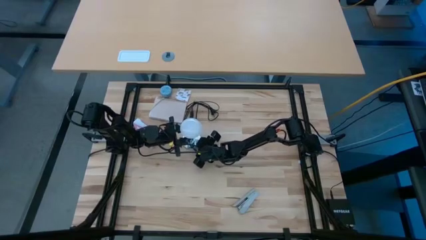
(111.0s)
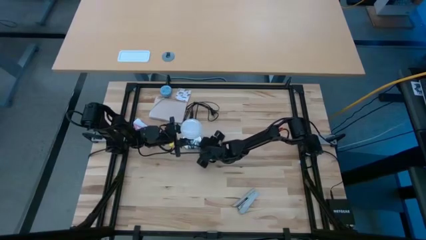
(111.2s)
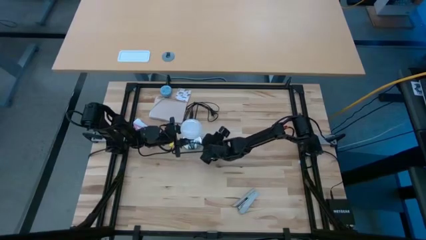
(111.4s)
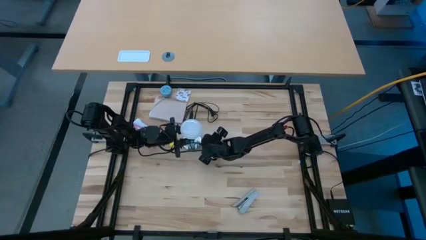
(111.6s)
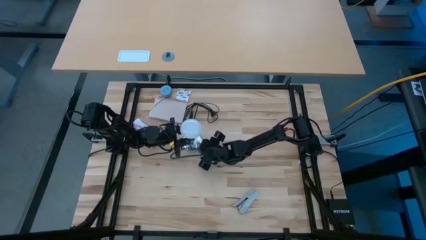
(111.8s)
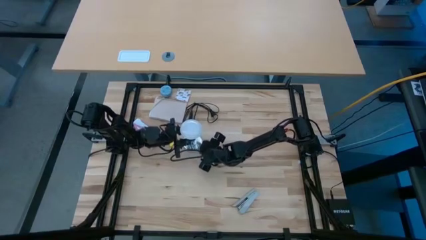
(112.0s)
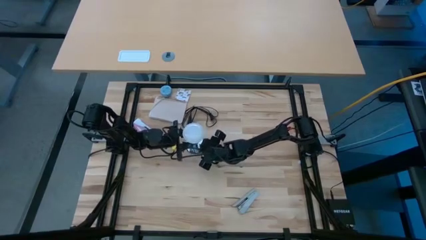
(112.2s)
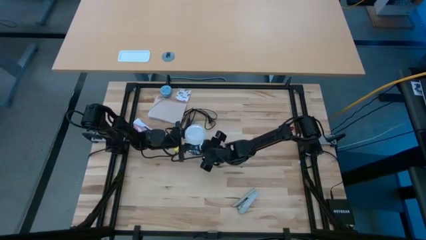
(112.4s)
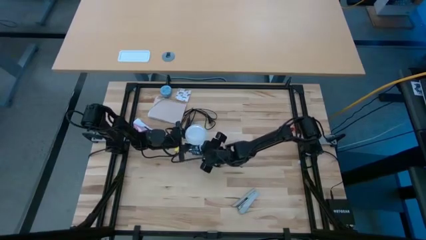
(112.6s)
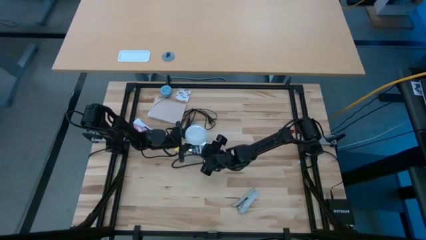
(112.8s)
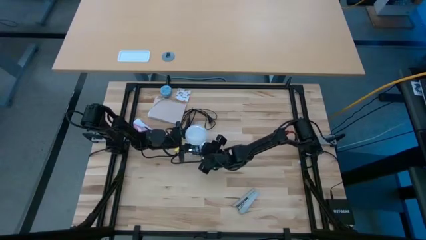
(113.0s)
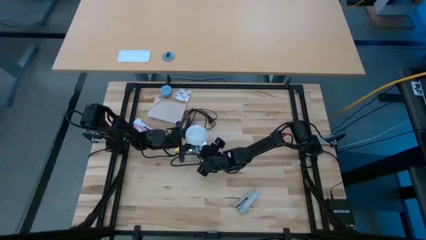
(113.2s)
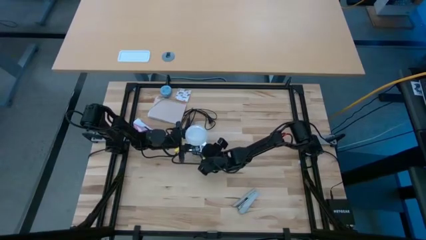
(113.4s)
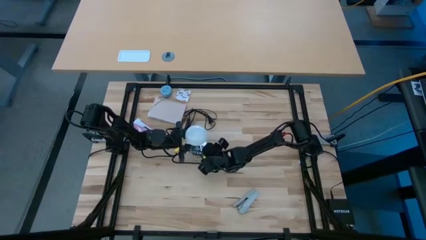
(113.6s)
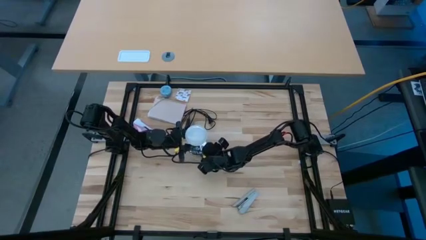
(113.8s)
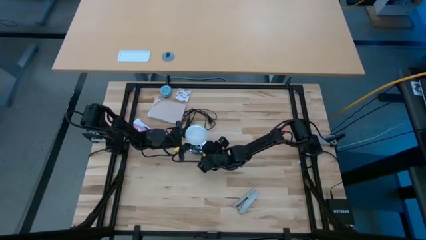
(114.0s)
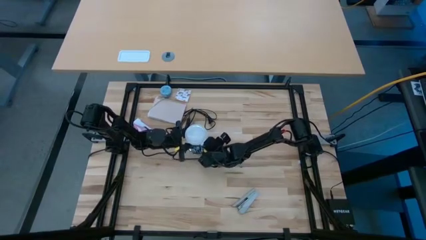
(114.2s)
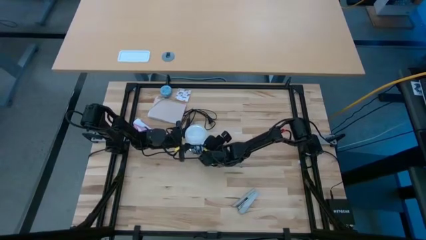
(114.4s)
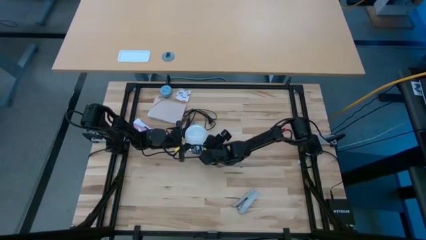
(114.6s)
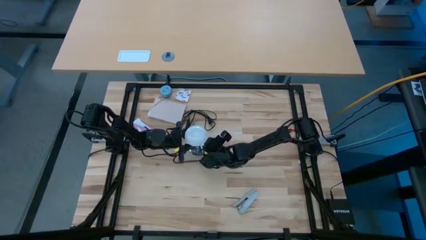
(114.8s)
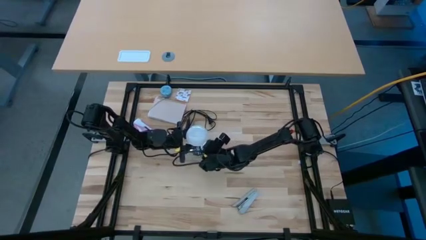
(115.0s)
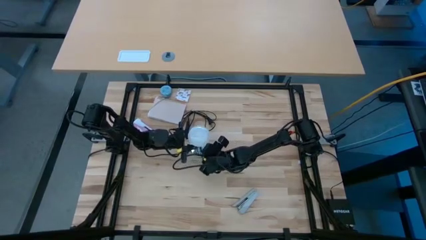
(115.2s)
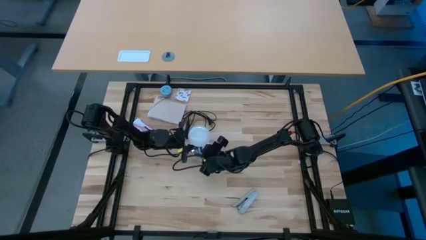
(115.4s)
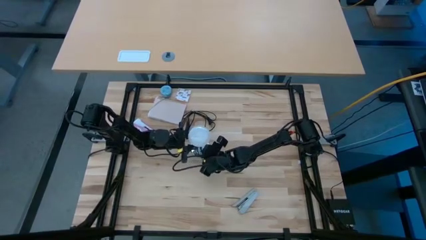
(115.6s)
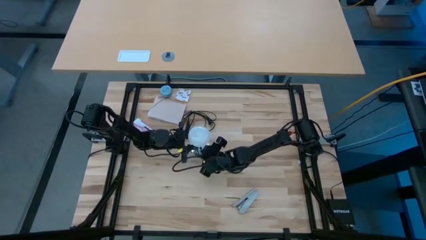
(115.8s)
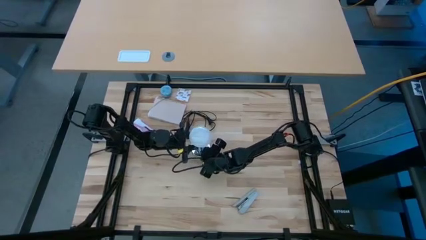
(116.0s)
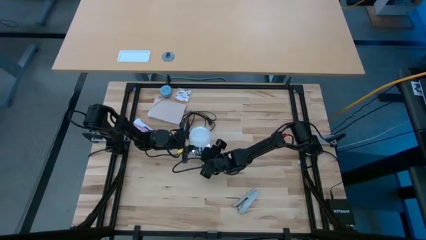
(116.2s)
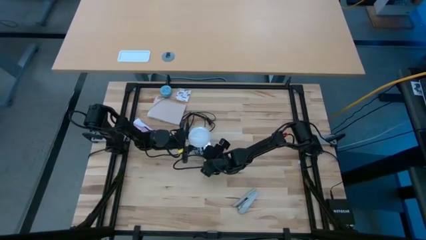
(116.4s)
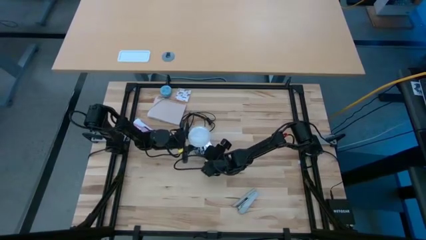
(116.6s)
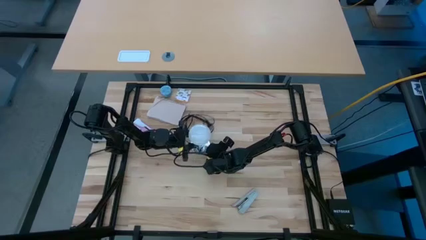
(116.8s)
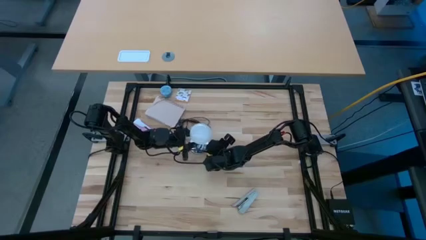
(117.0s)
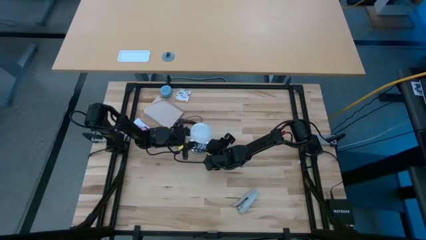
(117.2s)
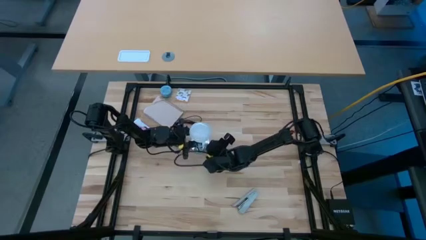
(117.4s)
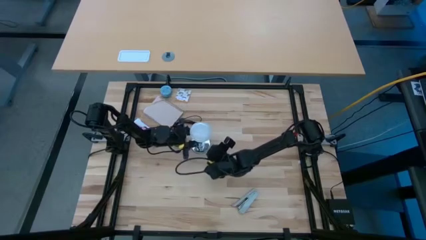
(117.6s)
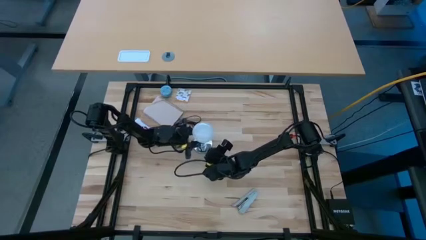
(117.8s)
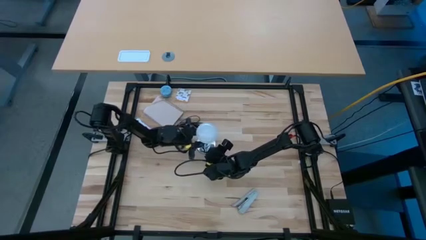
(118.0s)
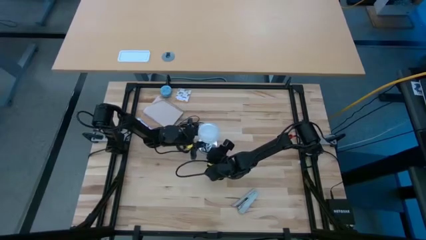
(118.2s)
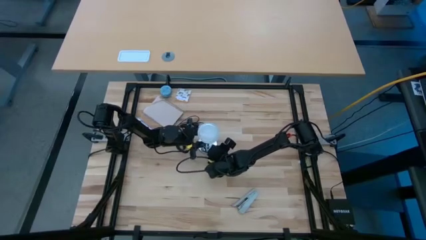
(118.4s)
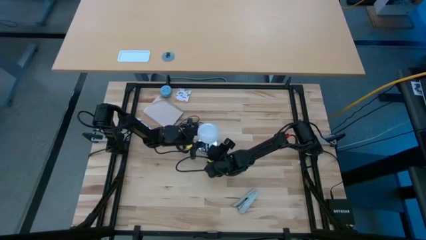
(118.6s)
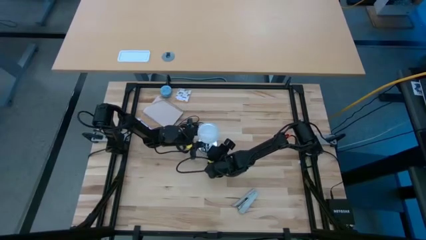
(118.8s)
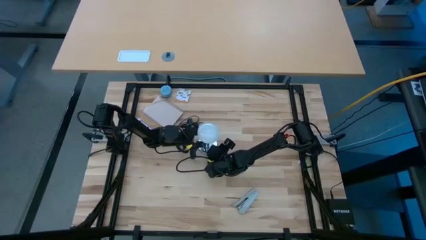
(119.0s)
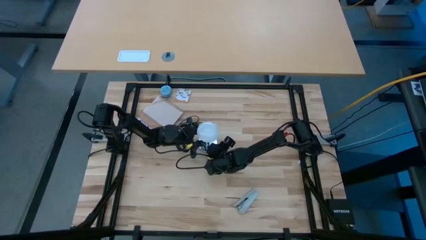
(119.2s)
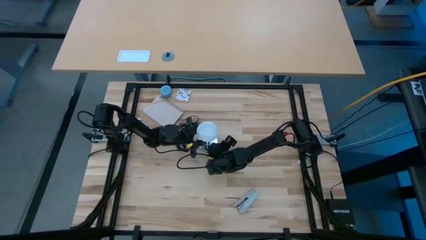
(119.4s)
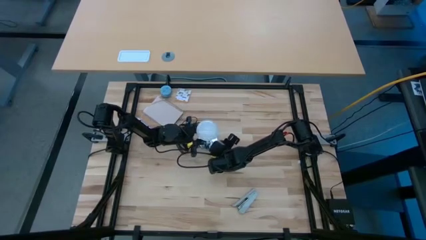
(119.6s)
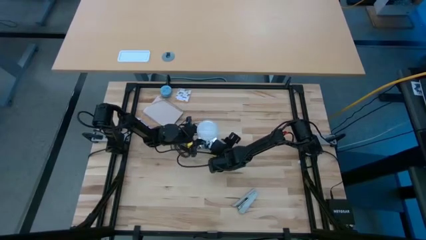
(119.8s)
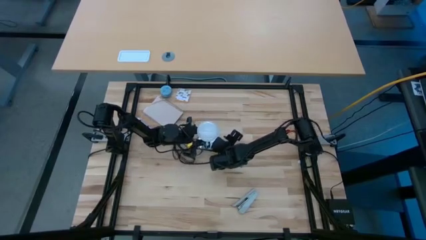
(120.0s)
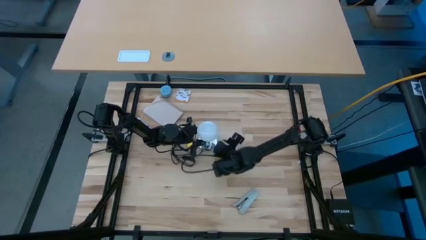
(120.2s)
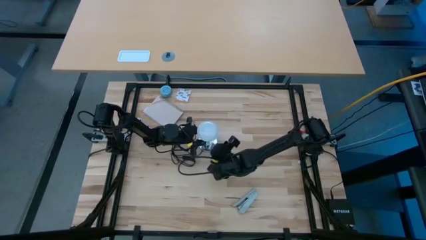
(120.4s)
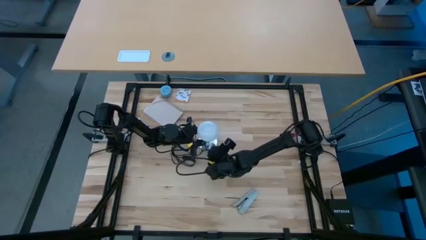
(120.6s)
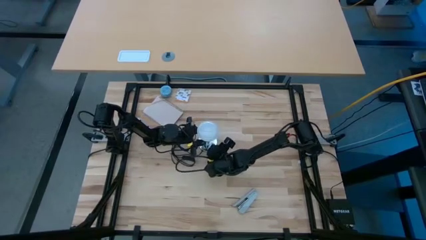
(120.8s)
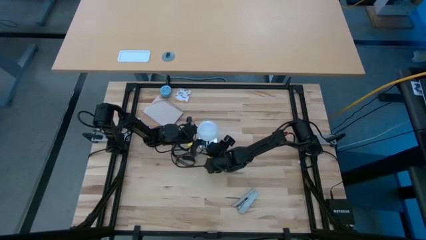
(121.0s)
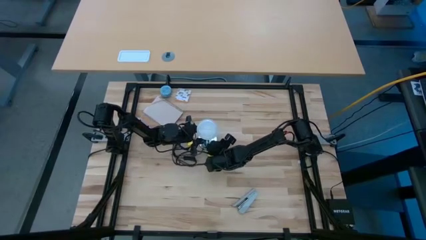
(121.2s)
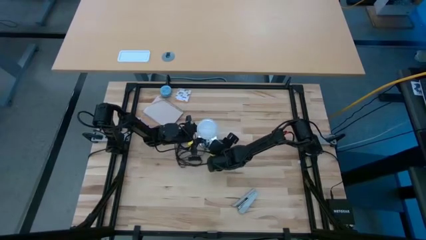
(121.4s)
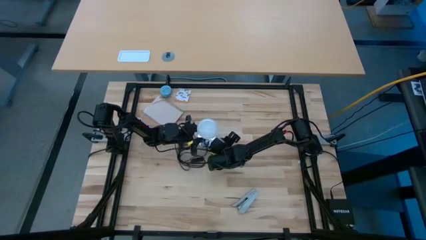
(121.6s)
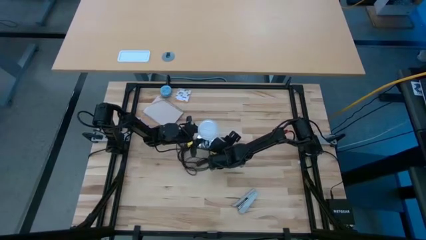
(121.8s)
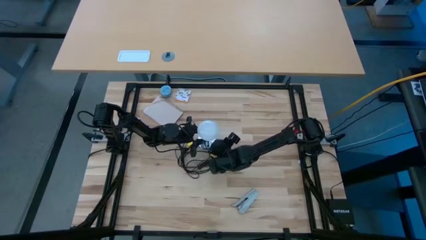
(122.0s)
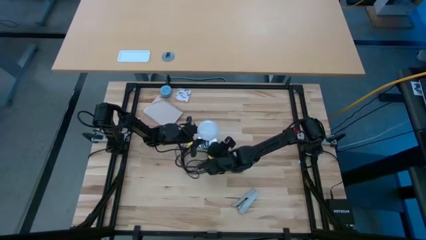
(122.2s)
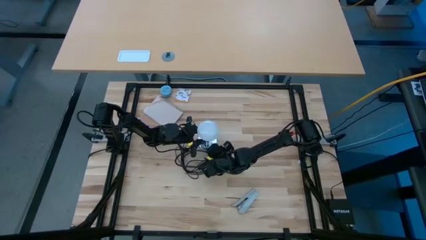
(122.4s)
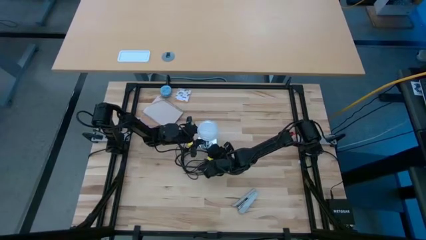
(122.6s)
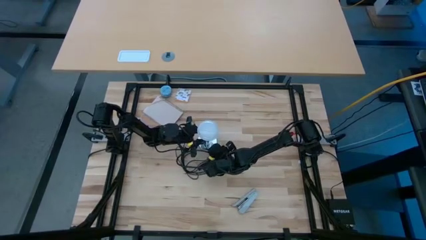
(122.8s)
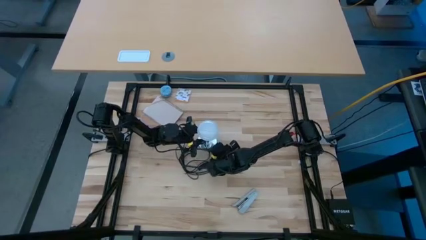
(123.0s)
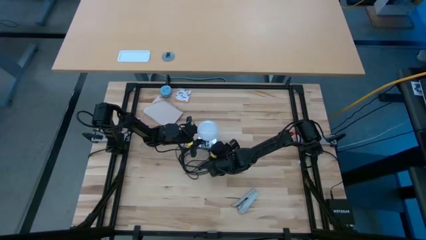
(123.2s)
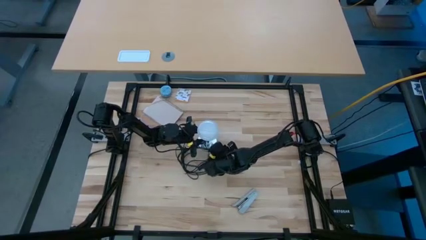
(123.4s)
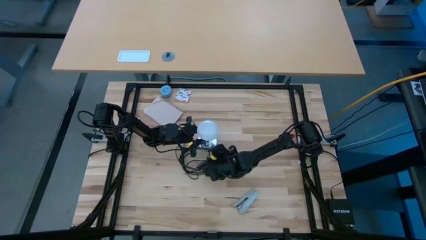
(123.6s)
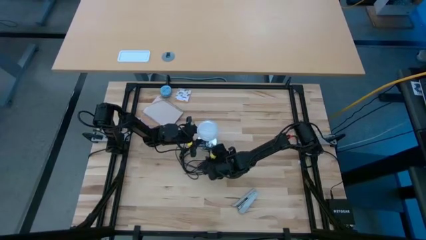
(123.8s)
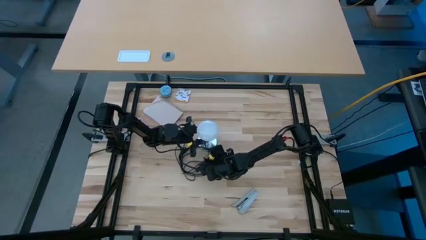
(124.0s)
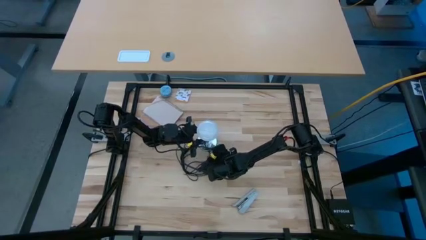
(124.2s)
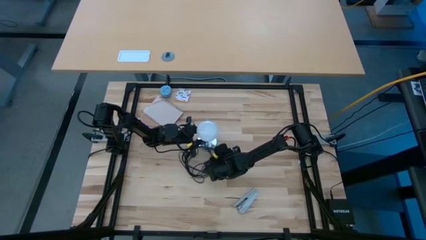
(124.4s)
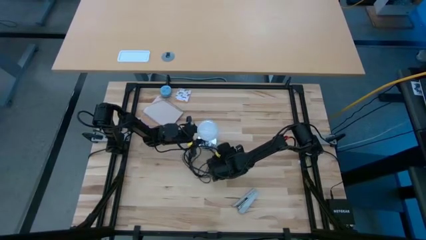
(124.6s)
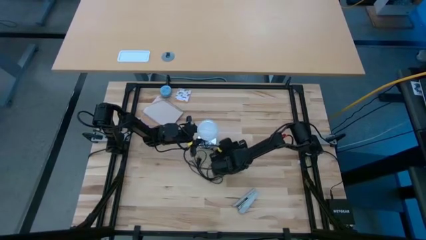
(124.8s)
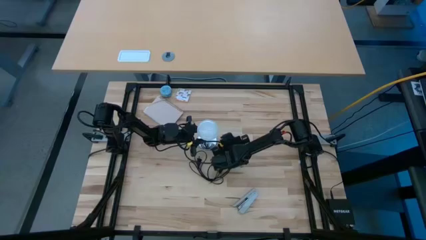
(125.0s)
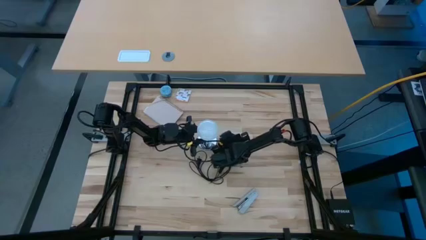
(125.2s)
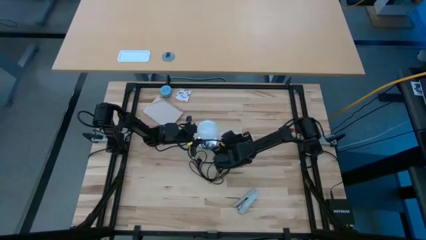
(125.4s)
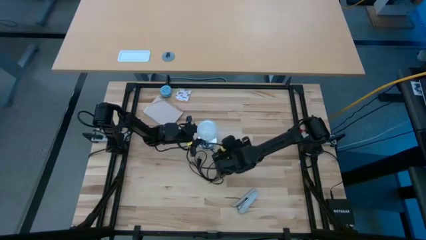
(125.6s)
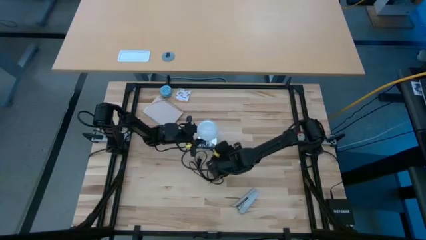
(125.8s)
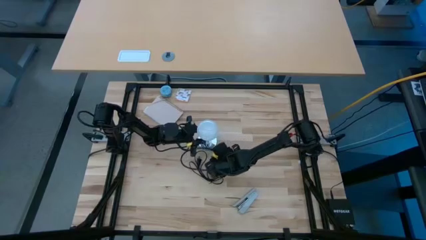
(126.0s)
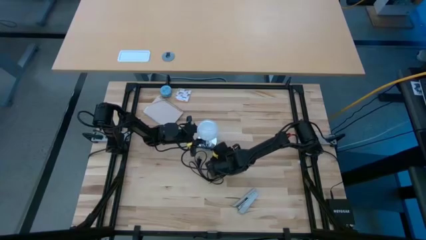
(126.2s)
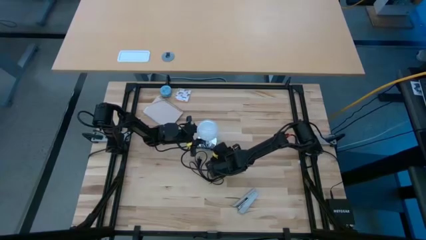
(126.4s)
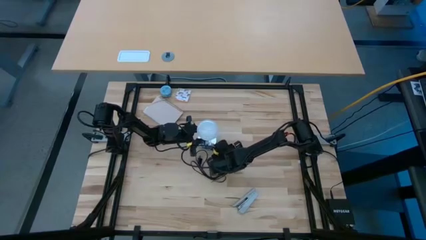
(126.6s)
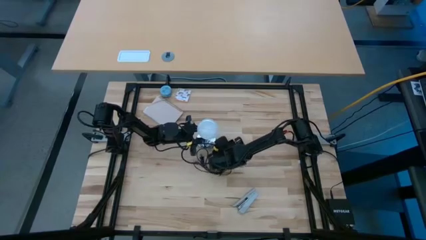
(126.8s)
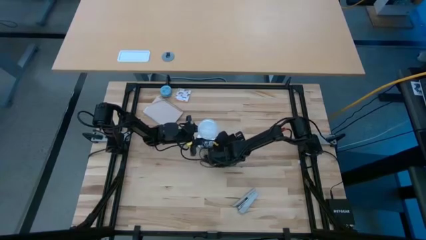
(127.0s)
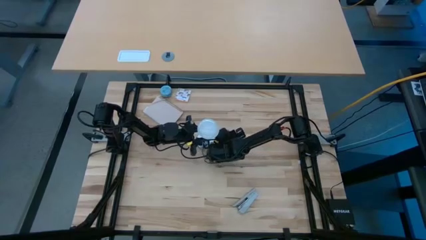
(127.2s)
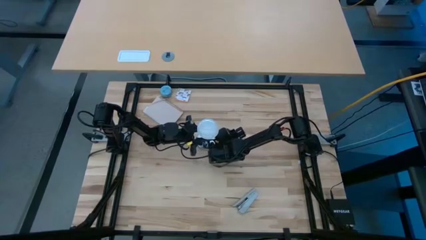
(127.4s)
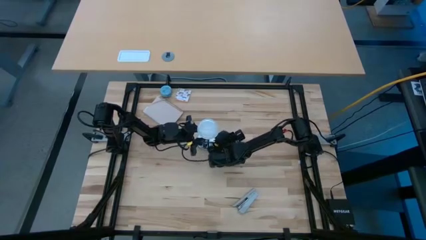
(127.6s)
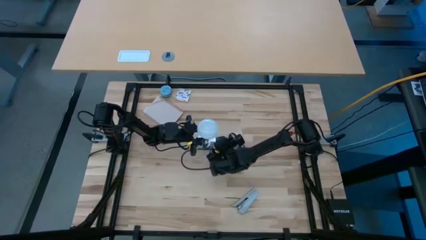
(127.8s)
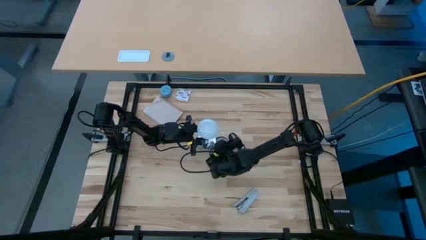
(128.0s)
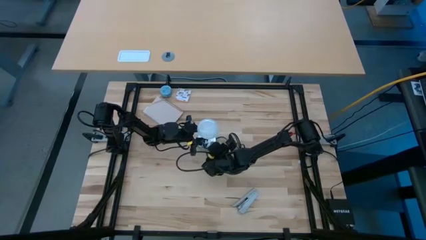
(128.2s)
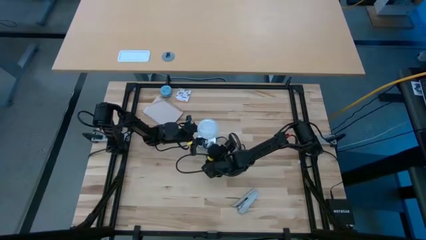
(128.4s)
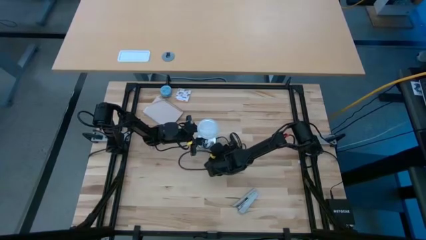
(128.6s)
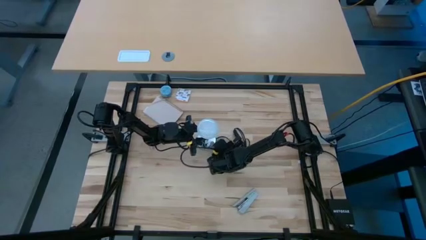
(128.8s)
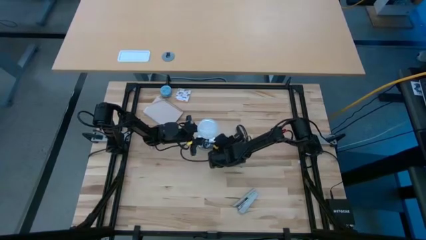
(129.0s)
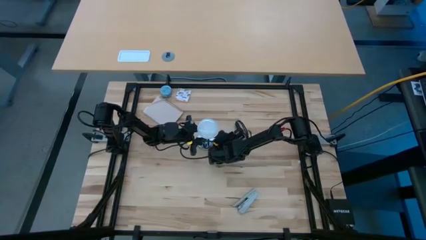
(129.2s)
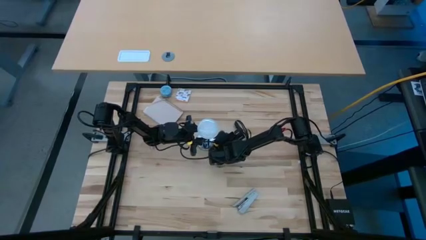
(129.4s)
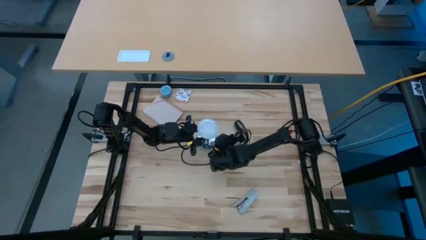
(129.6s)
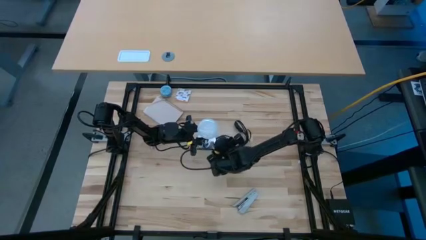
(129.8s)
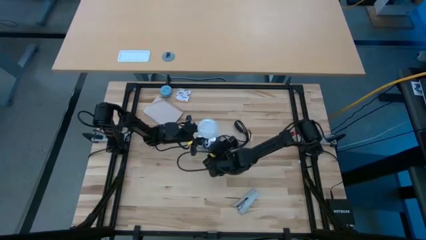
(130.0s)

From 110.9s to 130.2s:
Task: Screw lightbulb
Insert the light bulb into the lamp
